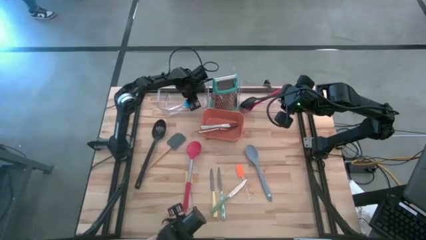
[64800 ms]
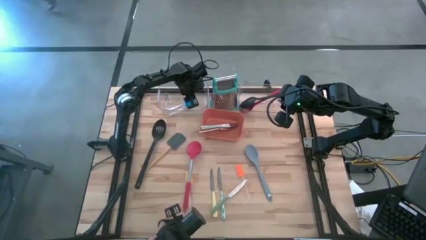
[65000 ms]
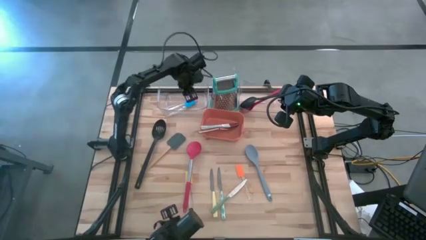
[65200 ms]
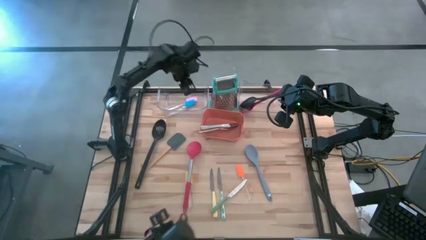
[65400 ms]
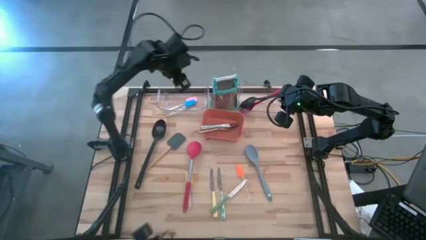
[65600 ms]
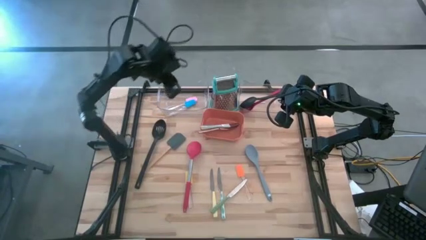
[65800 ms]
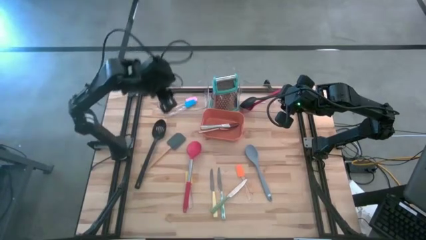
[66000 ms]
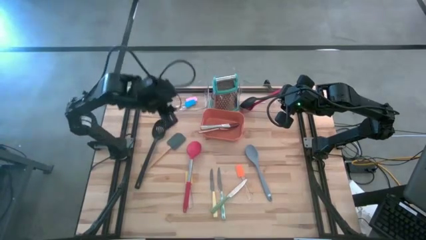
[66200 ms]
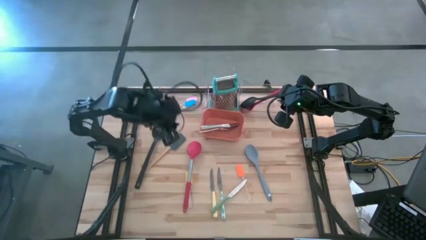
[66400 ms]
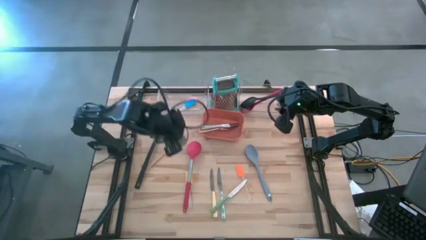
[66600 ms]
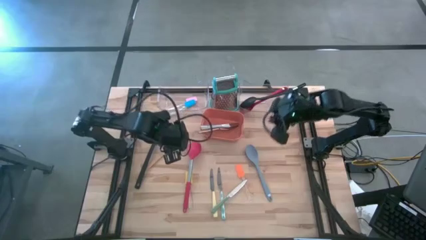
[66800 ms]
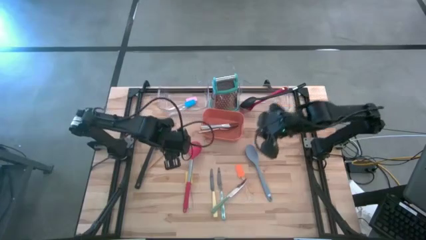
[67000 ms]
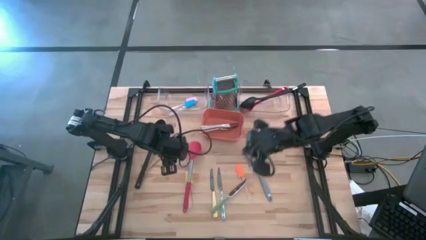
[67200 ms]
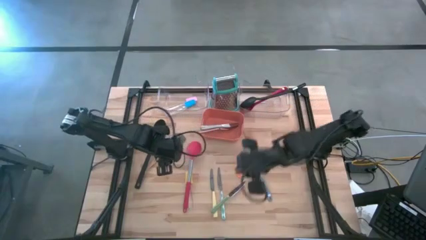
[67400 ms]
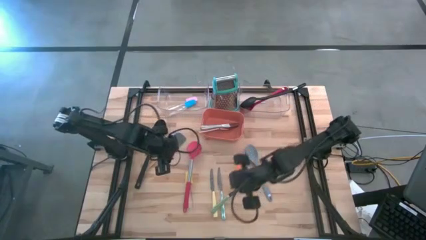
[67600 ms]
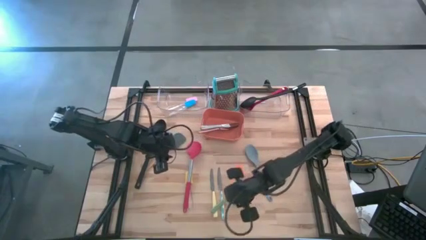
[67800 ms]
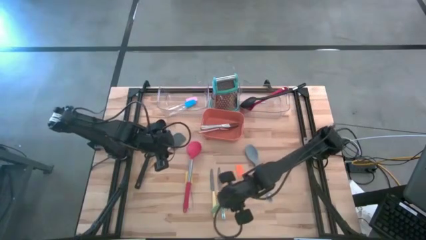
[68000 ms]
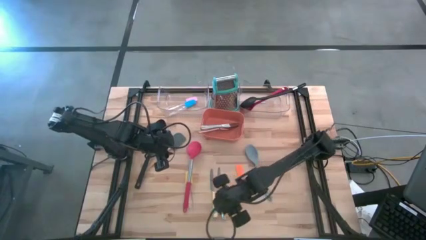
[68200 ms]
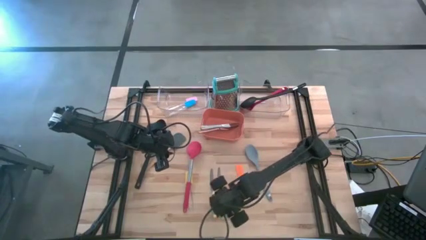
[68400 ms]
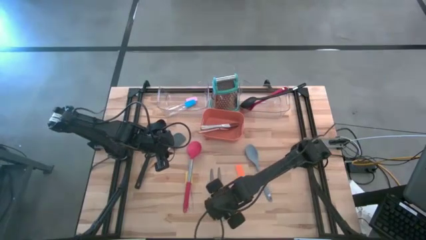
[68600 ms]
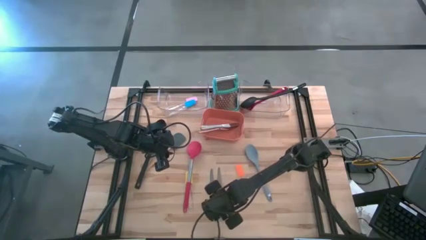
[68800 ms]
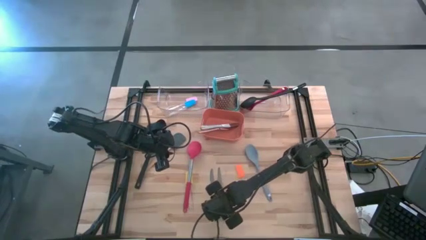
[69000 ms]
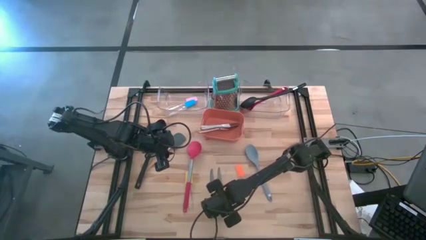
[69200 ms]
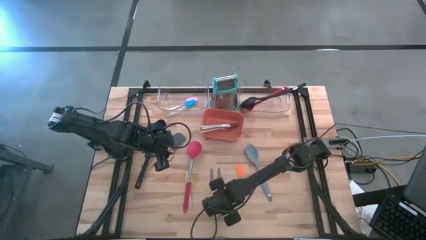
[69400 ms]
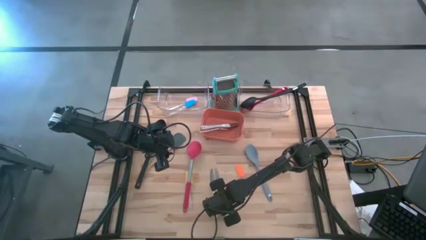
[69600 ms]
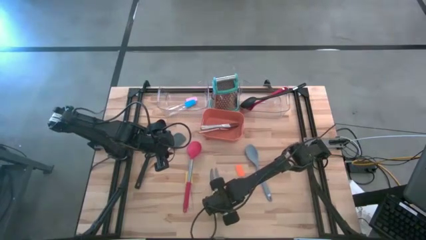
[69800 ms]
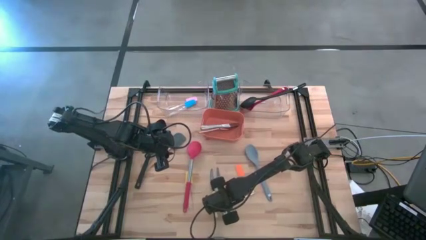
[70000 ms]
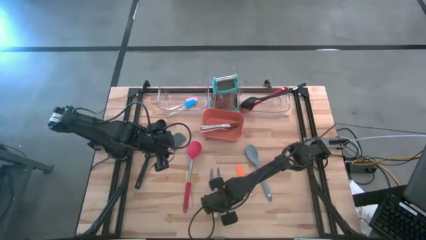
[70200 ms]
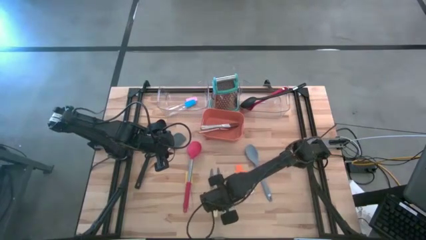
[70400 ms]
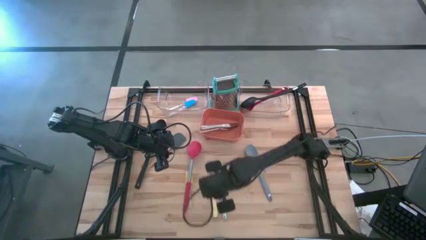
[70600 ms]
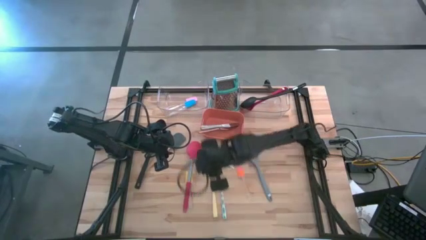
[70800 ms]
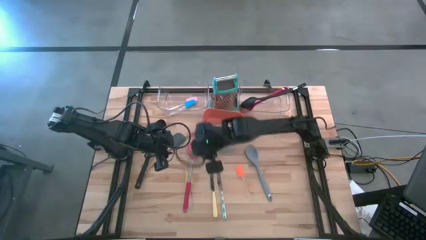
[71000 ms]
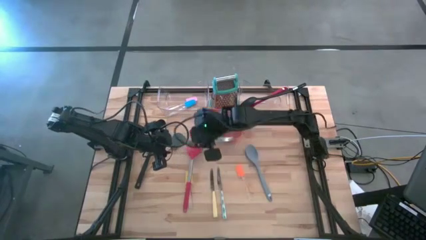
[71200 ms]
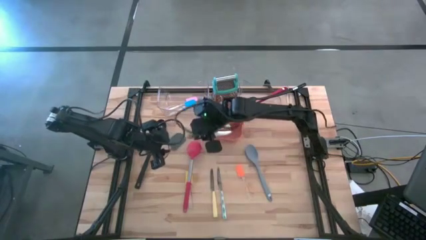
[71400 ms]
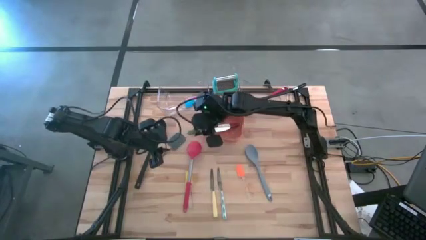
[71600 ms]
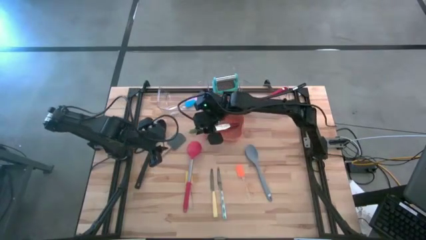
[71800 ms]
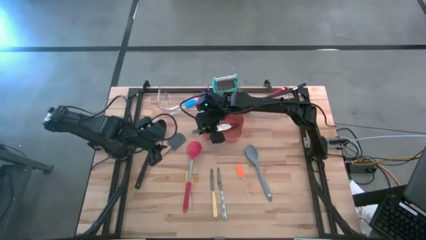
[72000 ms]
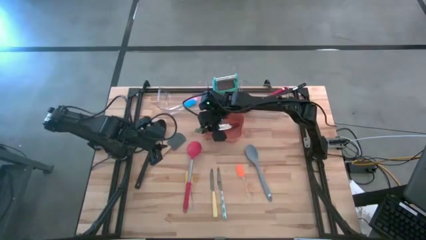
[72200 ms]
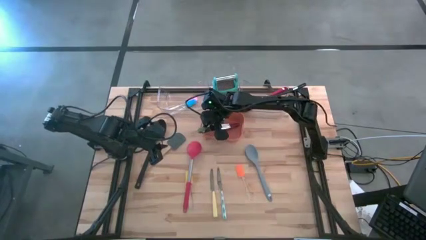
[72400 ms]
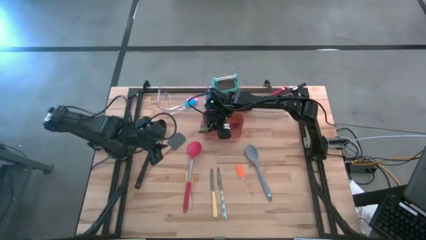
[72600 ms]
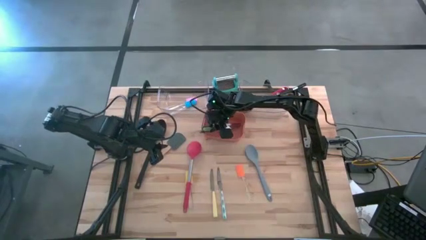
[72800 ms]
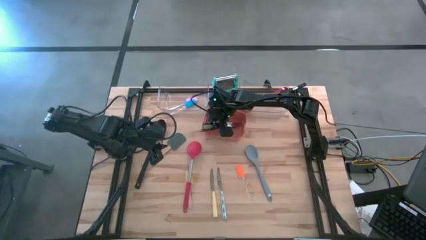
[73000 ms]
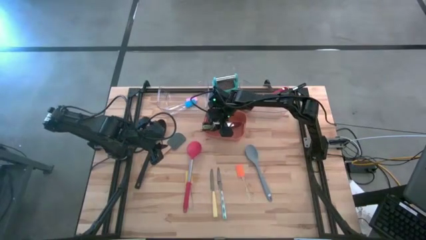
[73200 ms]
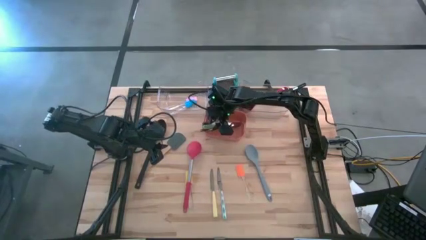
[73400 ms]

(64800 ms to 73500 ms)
Task: Pick & Place Kitchen Items
Put the green table knife into the orange bin

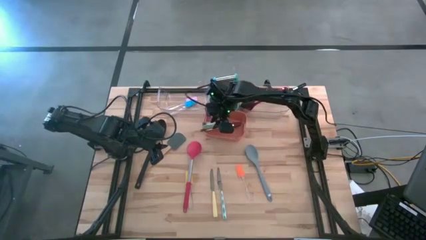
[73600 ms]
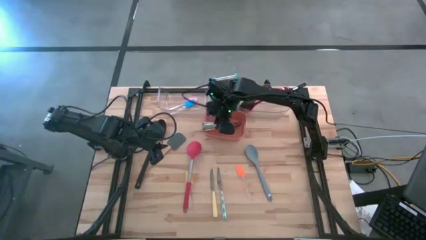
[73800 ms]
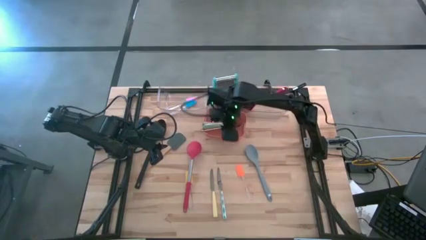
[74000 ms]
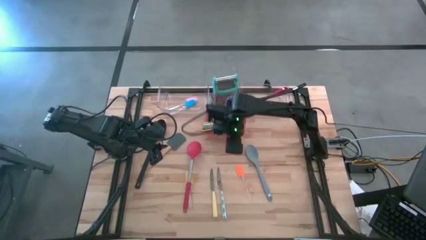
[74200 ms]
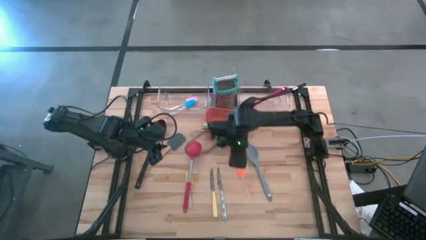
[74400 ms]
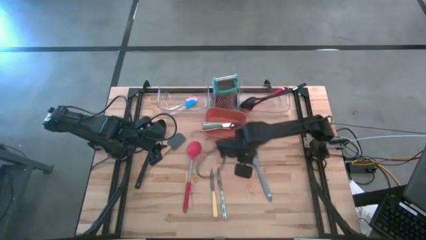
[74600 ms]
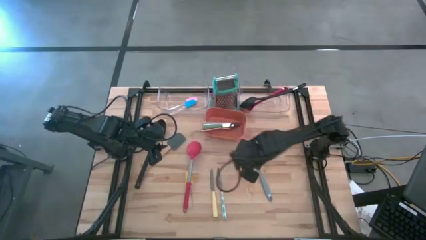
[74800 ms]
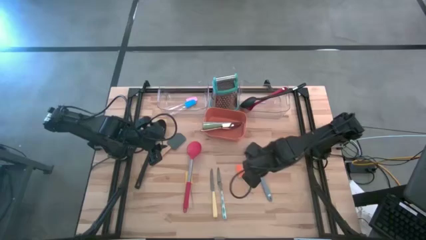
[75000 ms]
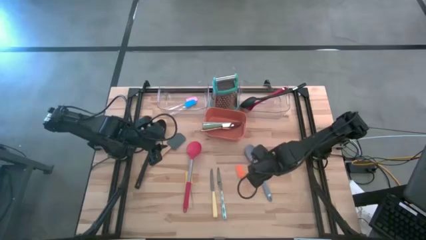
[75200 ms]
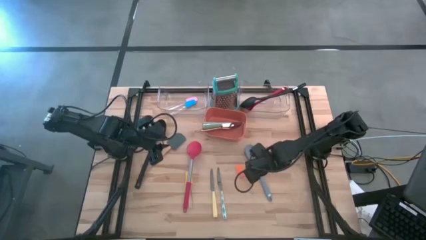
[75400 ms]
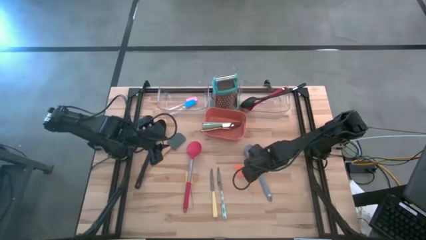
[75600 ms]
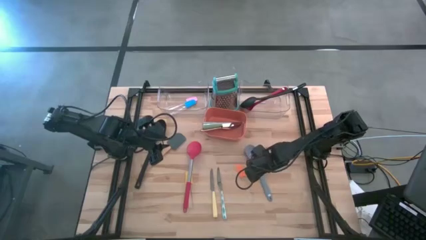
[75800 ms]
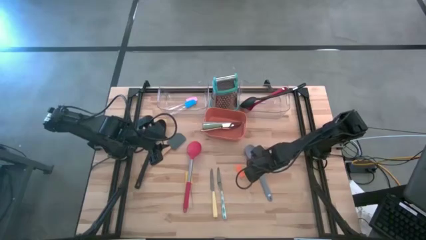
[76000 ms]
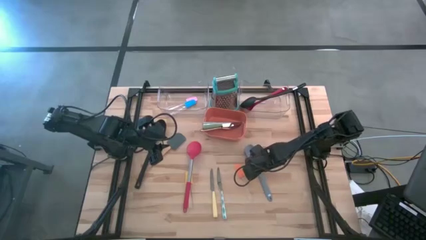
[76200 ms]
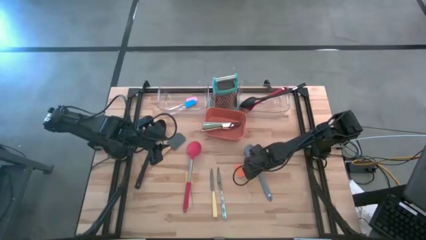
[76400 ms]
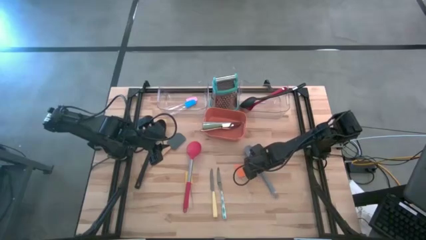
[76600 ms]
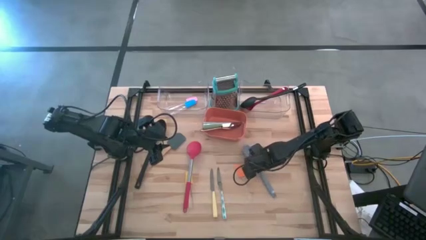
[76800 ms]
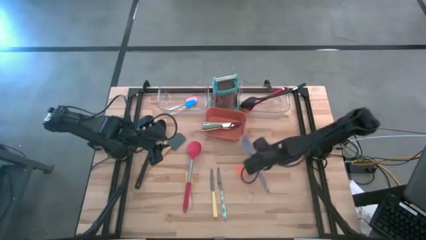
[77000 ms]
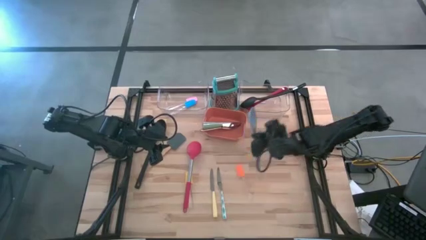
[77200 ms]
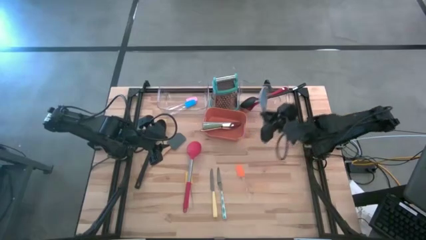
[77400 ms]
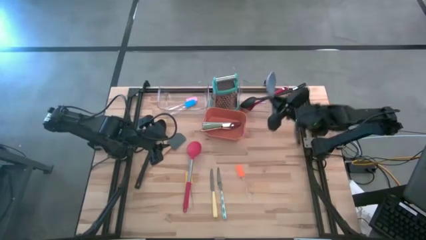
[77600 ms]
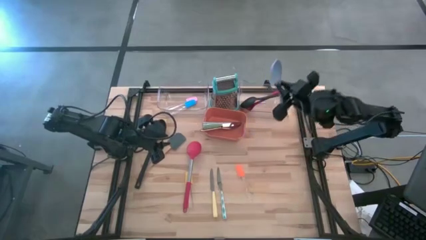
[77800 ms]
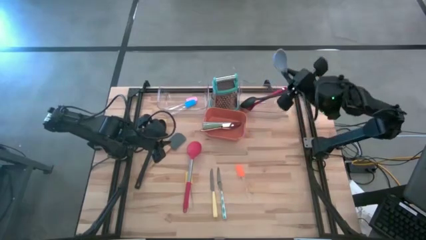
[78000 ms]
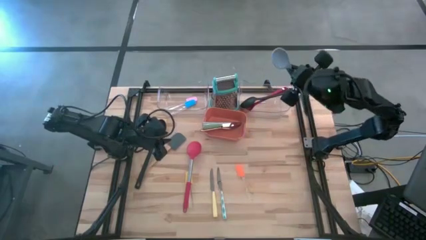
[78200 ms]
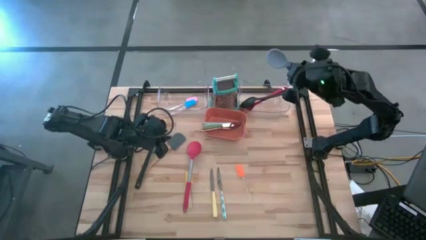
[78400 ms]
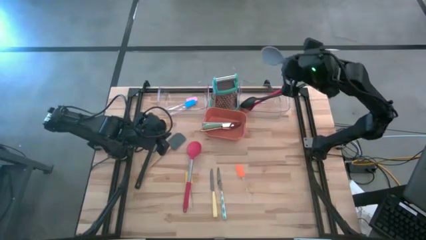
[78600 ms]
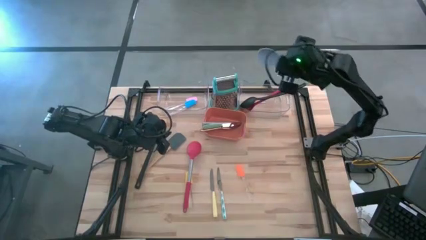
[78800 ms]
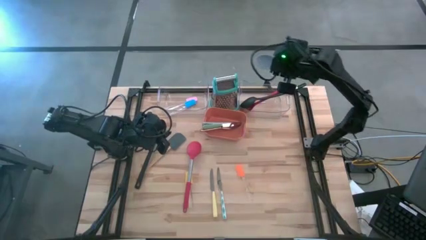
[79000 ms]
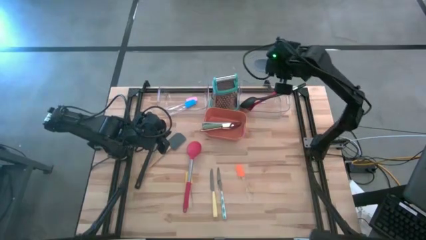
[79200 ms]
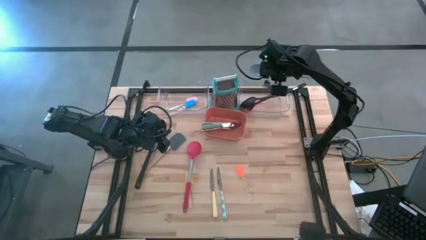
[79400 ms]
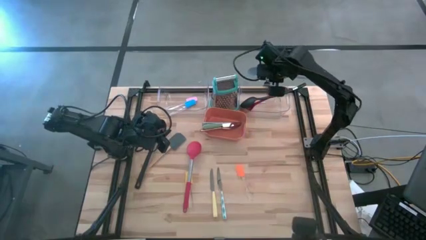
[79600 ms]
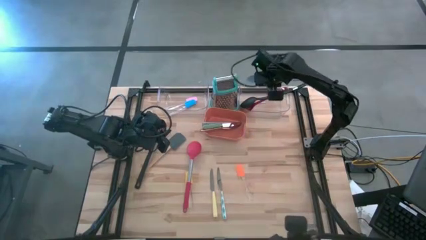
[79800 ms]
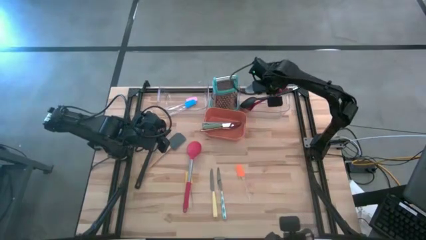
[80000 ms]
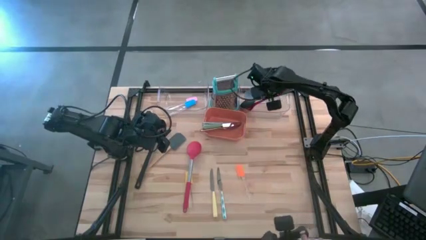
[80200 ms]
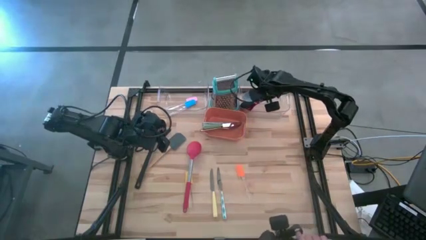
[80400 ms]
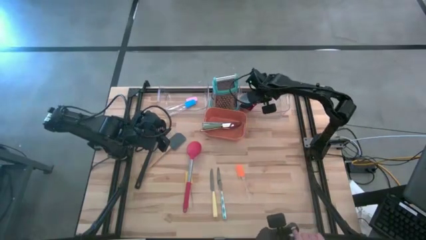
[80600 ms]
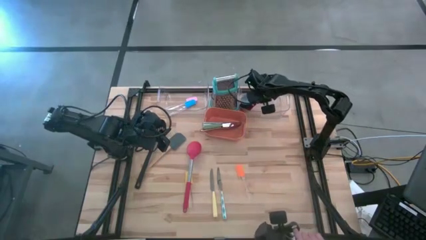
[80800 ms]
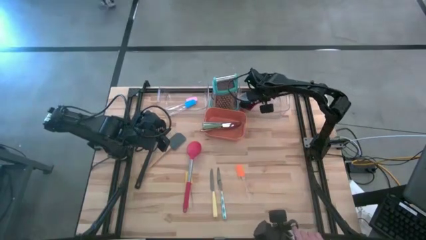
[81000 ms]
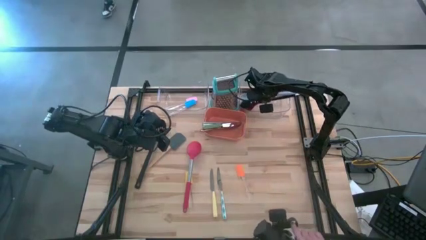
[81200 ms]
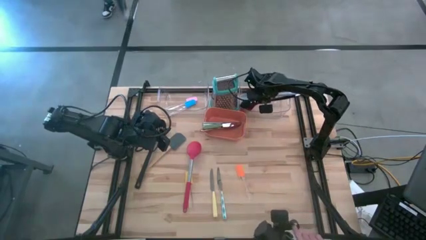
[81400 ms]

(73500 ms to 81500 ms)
Put the blue serving spoon into the right transparent bin
